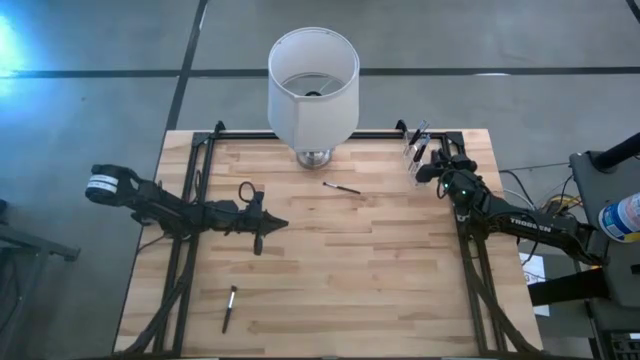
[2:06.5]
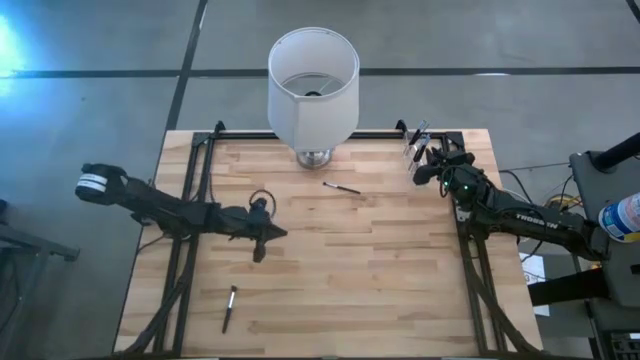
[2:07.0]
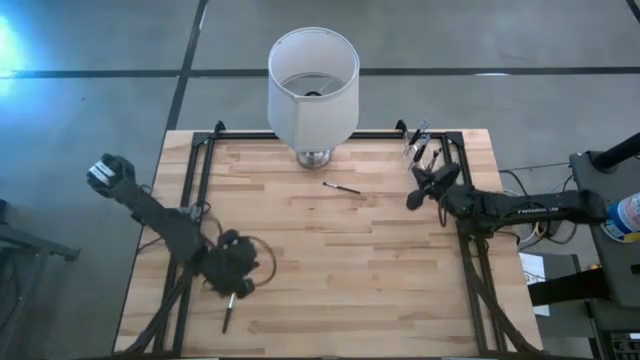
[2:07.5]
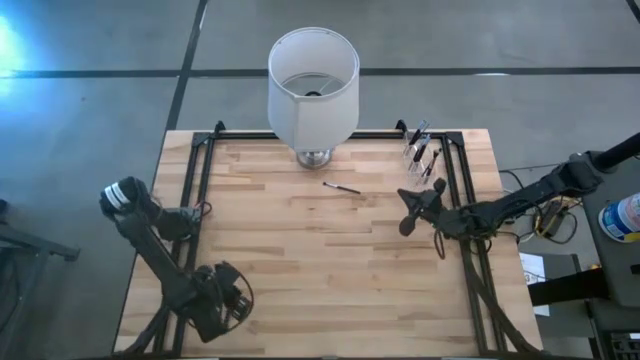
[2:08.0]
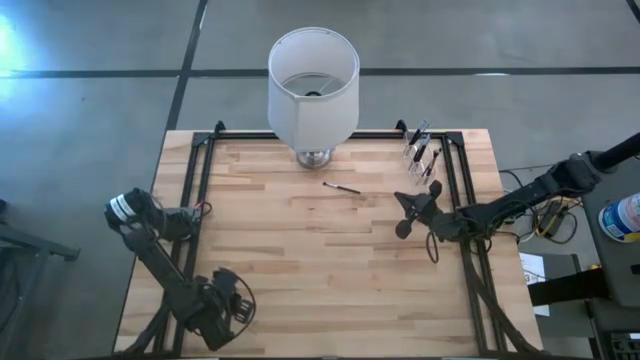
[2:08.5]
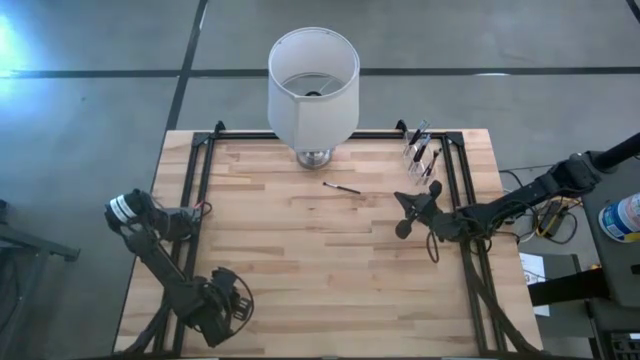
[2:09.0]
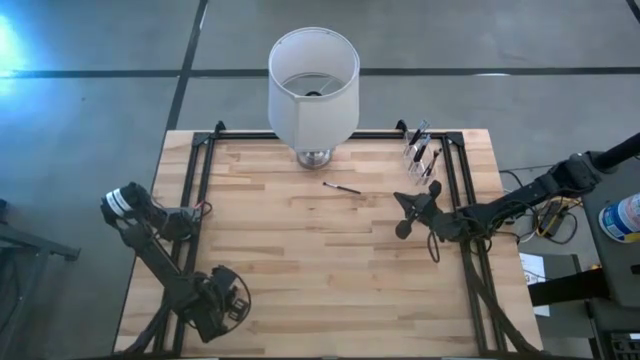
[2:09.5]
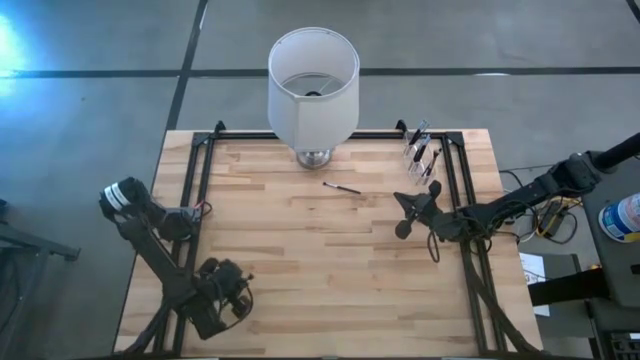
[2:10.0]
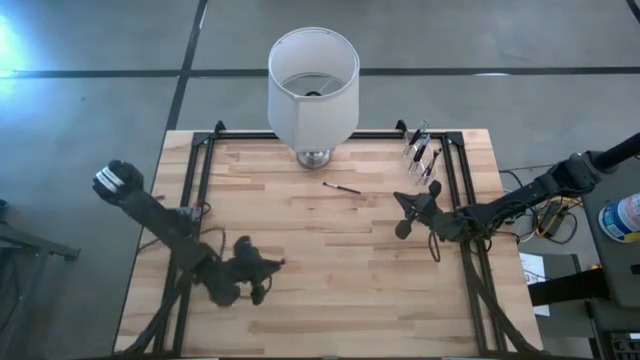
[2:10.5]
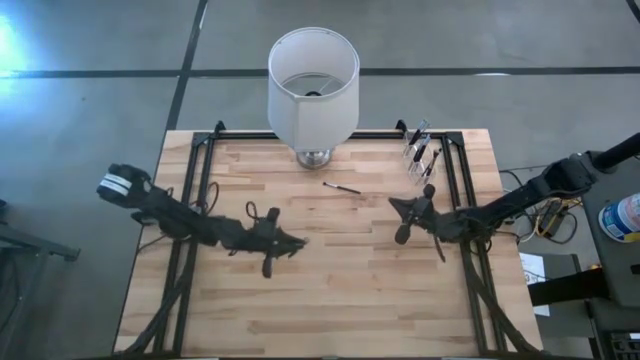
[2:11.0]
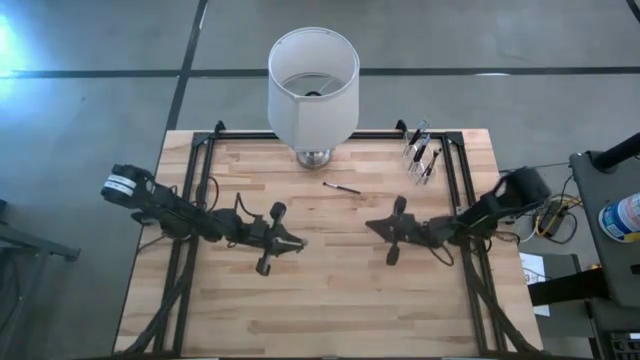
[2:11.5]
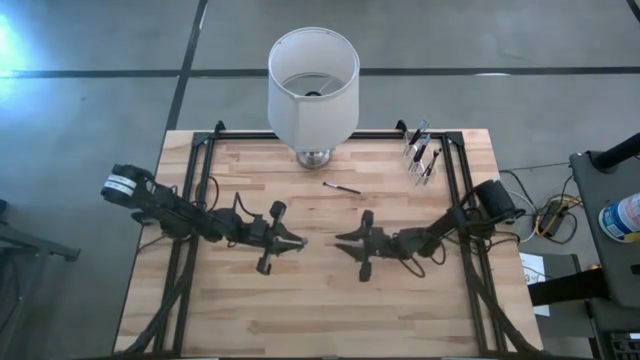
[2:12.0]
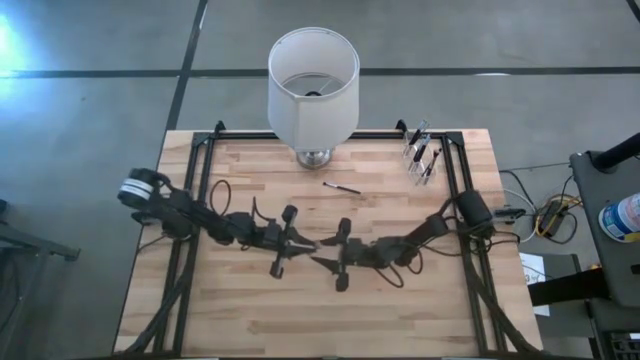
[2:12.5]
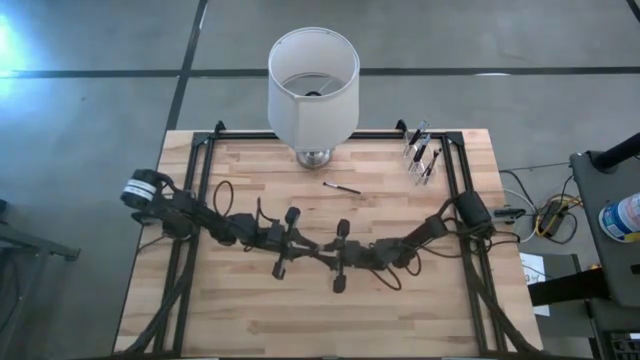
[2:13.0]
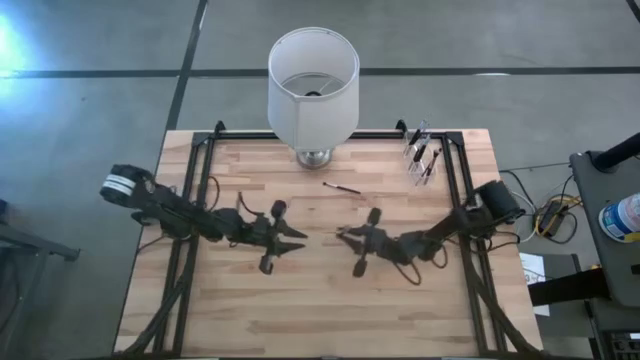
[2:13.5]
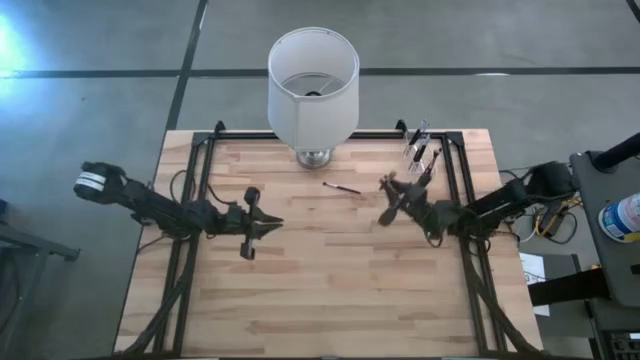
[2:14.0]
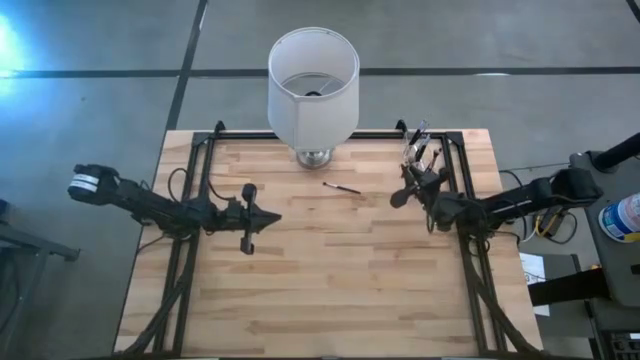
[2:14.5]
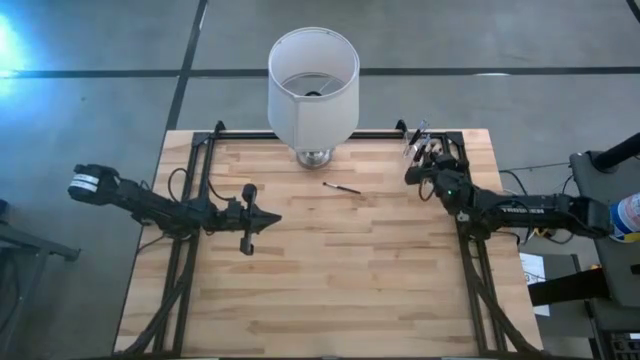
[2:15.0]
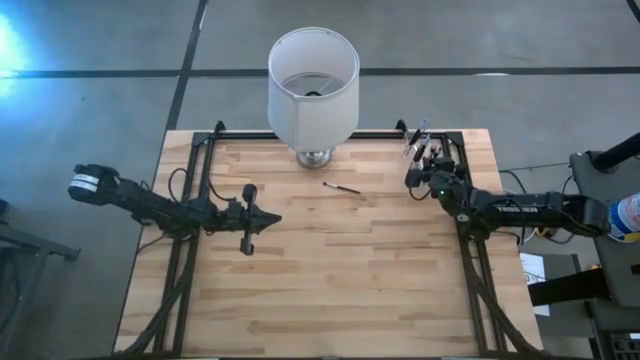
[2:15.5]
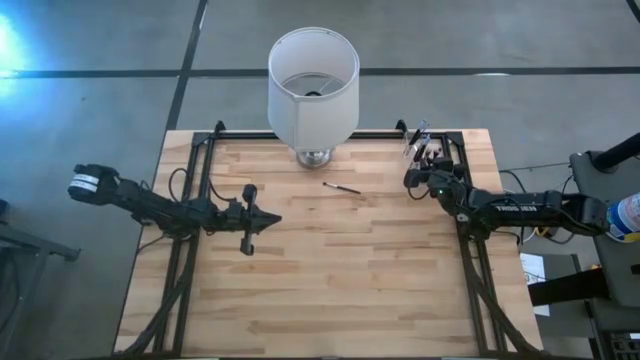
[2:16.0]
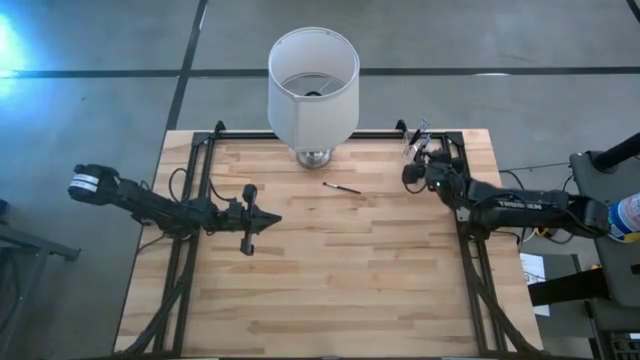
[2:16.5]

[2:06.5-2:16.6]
Task: Put items in baskets/containers
Put the powder brush into the transparent organizer

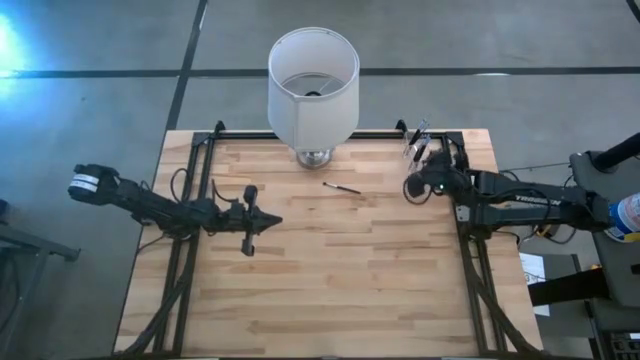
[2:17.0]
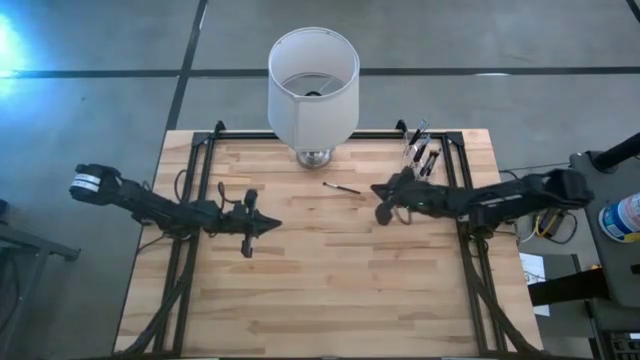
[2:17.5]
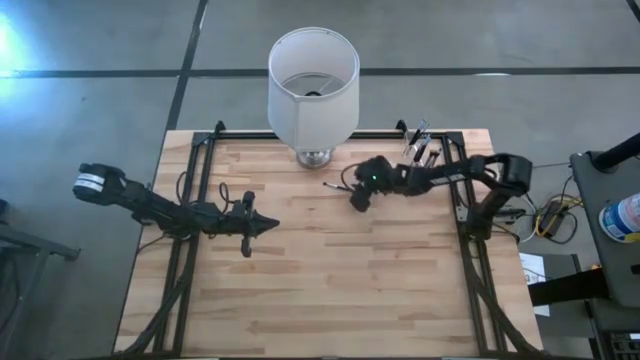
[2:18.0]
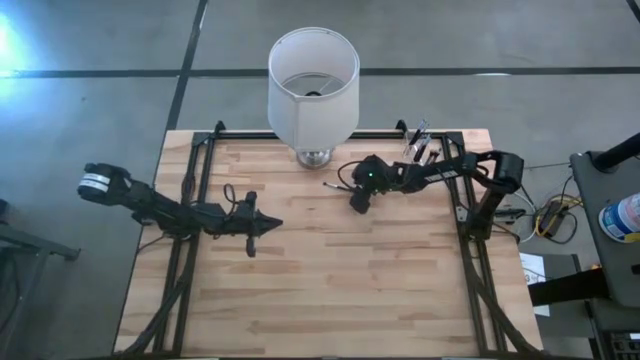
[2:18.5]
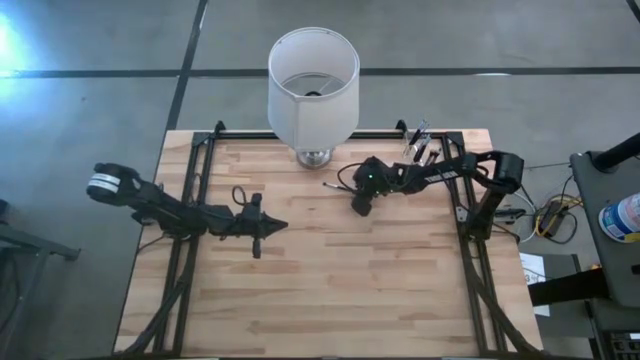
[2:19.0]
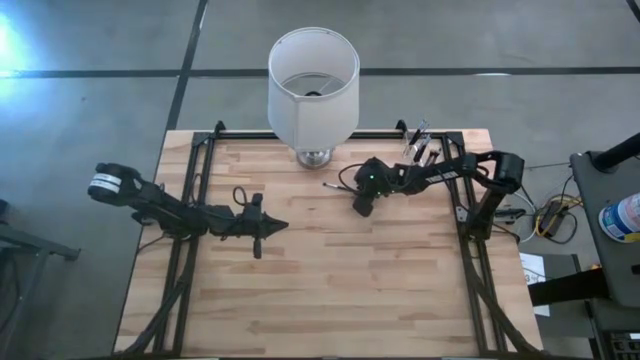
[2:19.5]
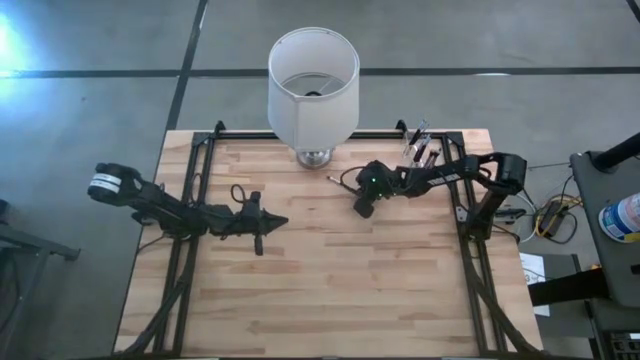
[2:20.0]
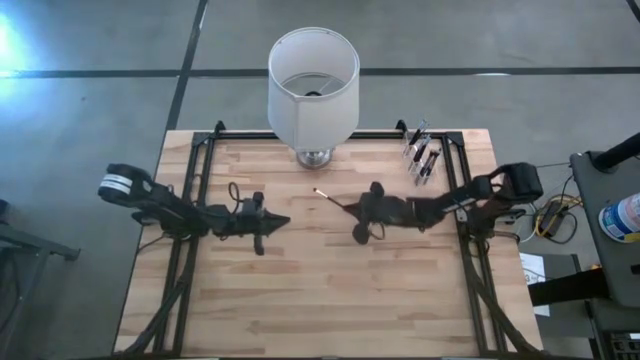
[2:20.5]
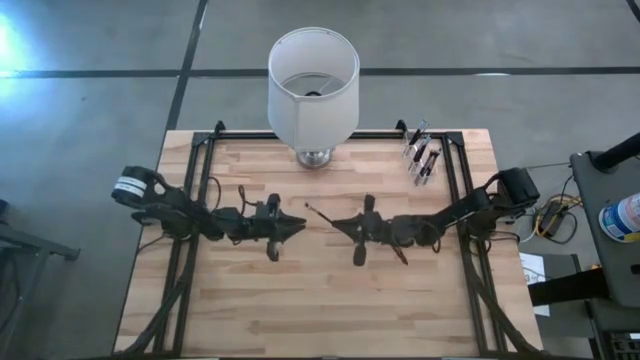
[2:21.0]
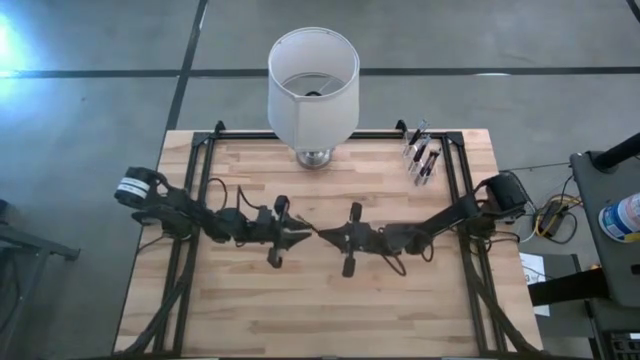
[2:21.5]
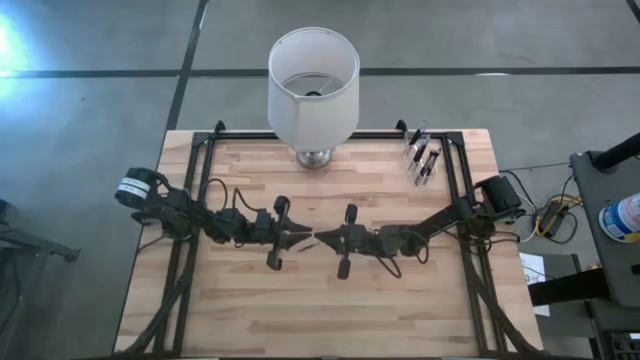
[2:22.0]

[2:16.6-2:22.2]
Put the blush brush into the transparent organizer

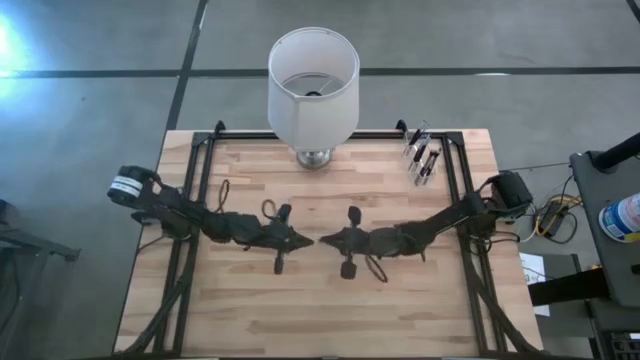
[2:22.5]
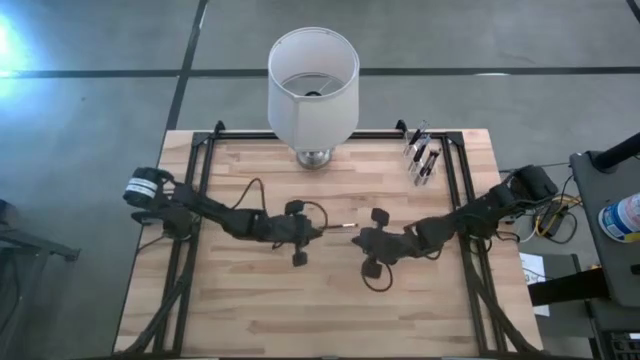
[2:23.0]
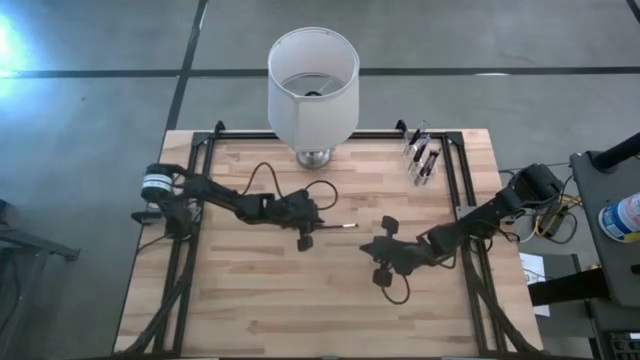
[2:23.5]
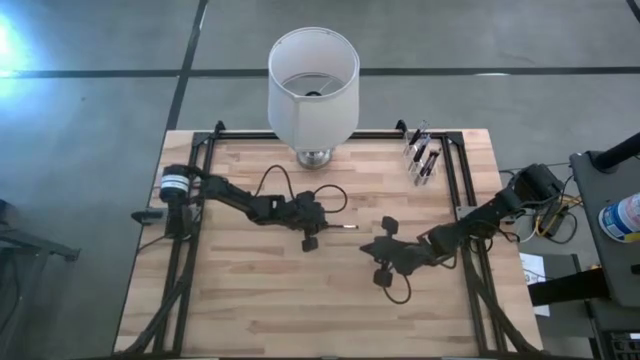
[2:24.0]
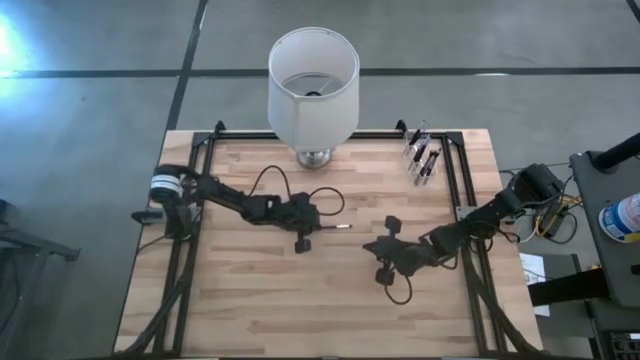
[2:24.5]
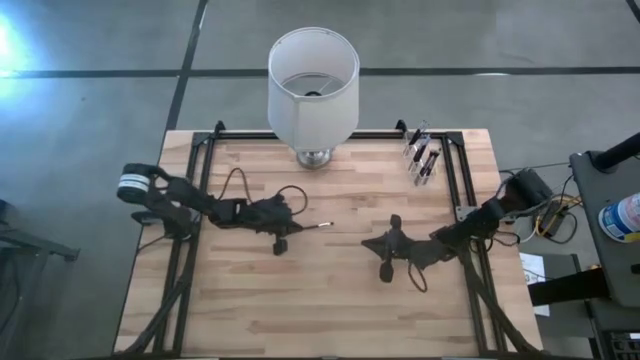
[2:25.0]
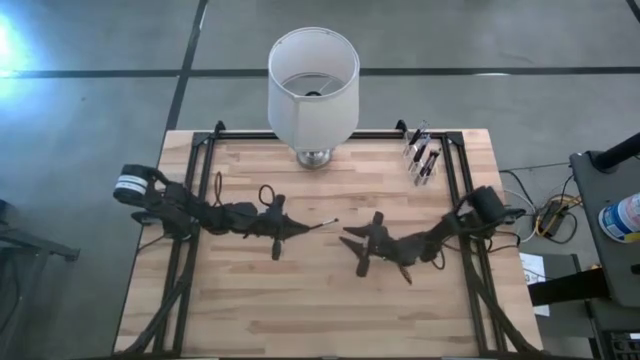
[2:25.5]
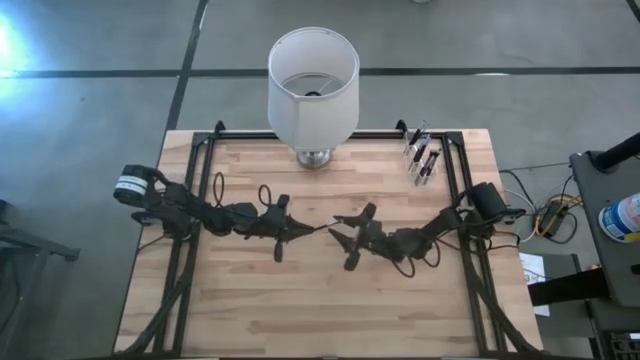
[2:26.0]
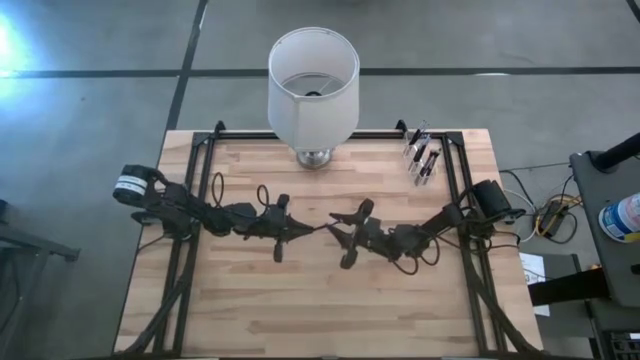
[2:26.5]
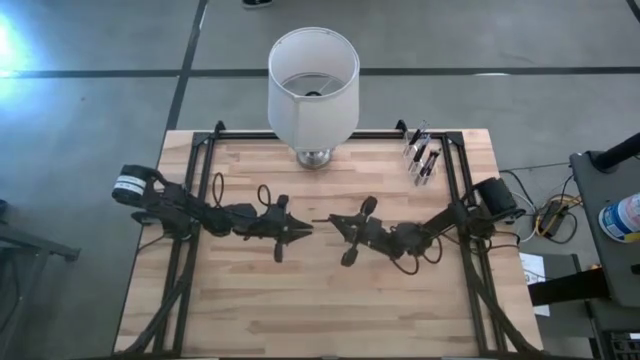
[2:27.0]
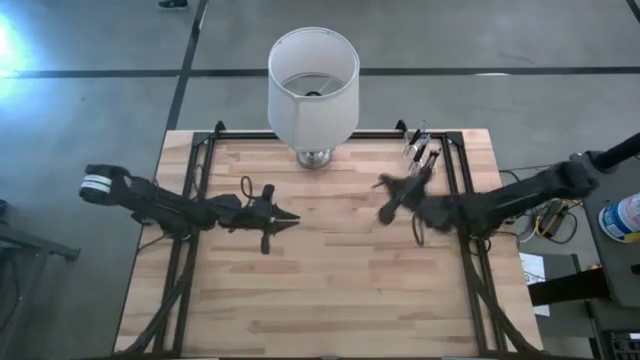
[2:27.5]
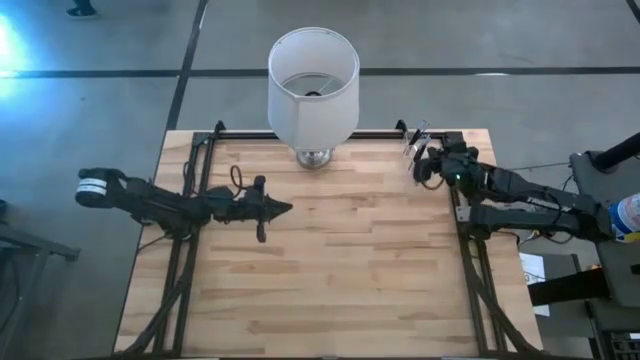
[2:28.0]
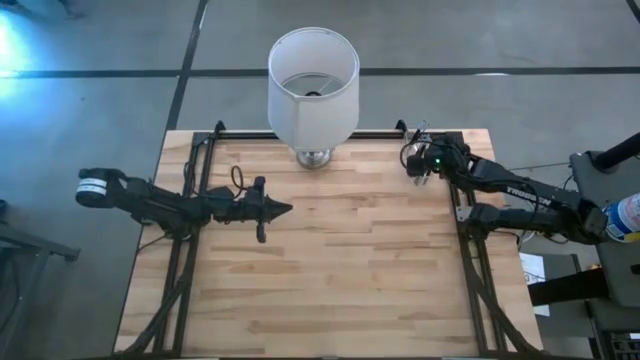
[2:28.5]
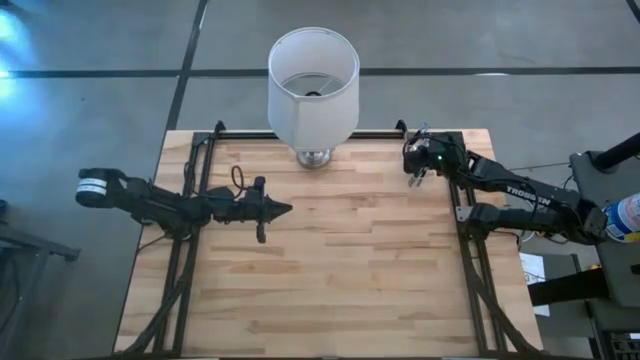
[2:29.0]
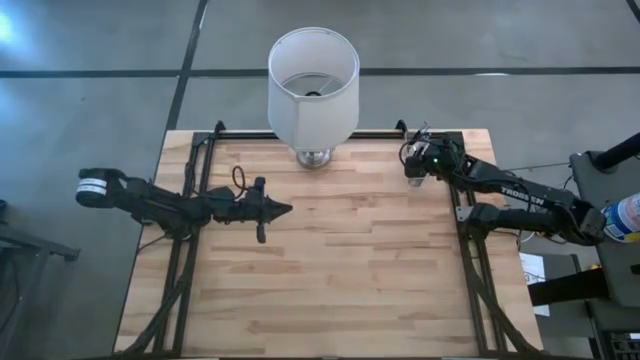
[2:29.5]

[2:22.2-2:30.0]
Put the blush brush into the transparent organizer
